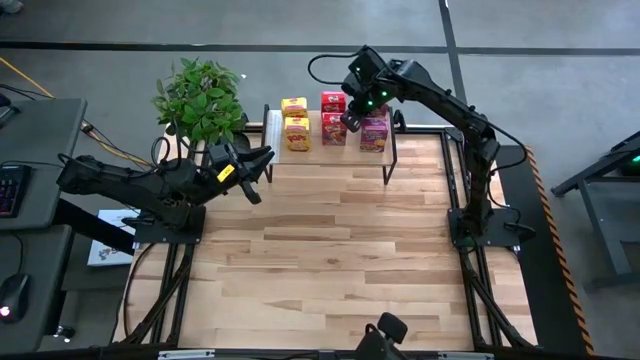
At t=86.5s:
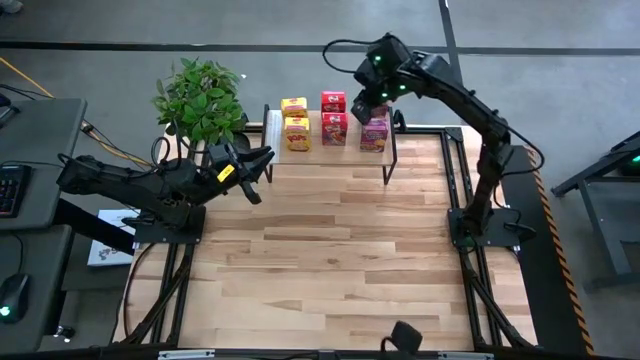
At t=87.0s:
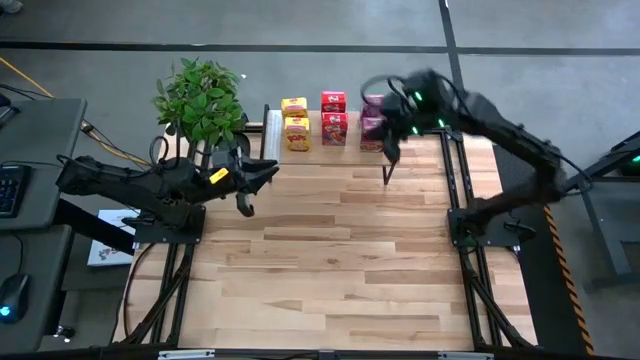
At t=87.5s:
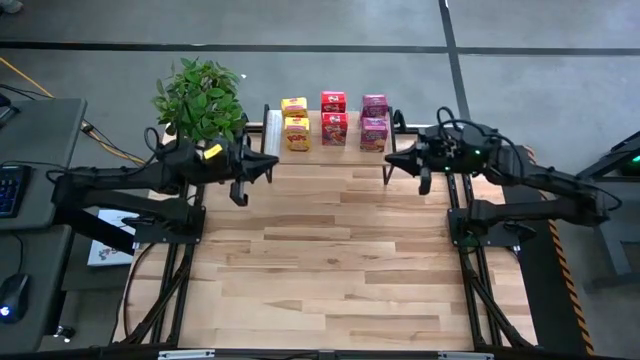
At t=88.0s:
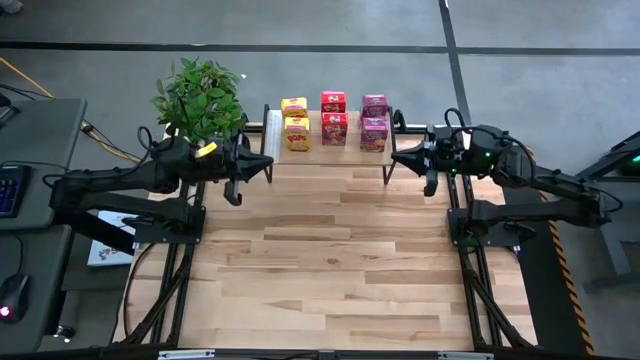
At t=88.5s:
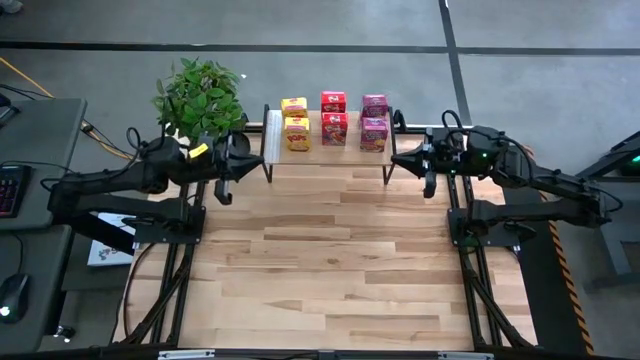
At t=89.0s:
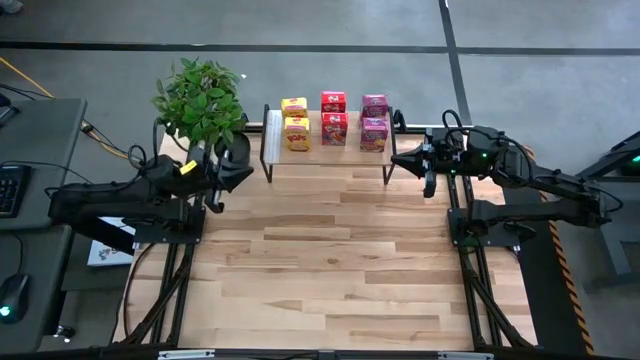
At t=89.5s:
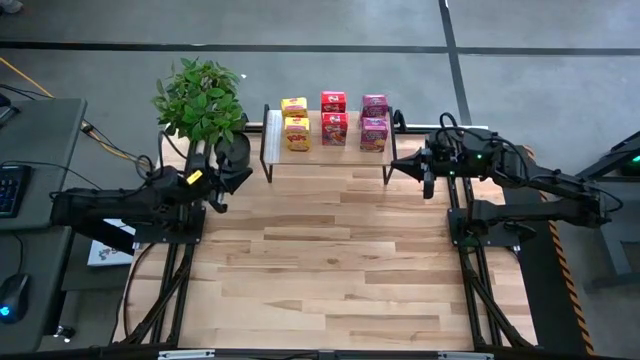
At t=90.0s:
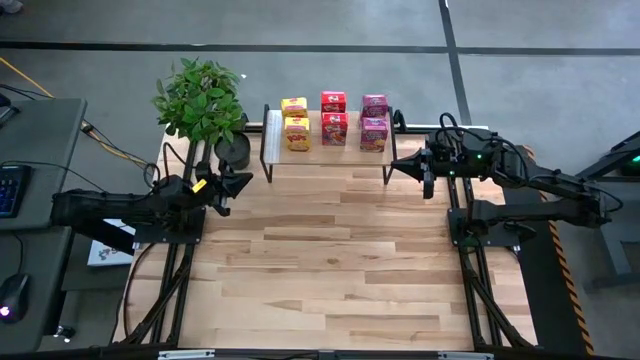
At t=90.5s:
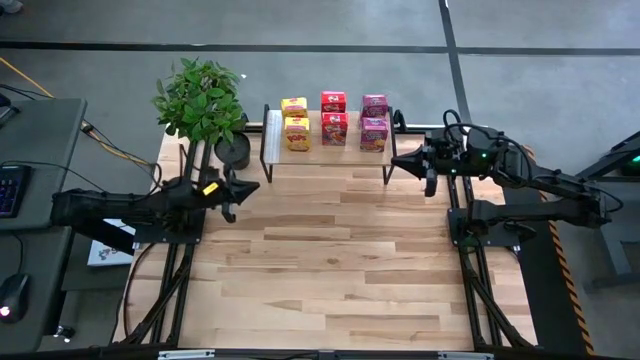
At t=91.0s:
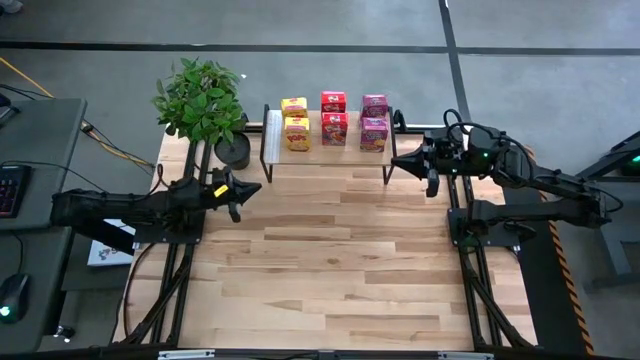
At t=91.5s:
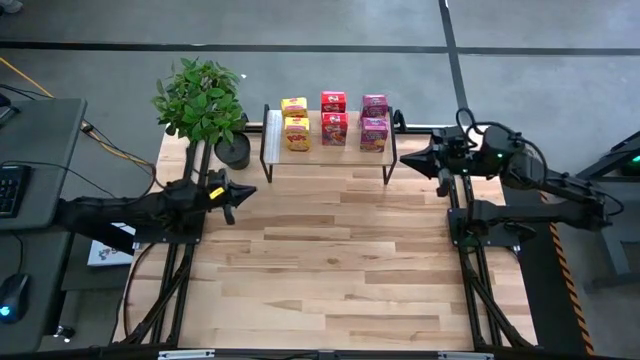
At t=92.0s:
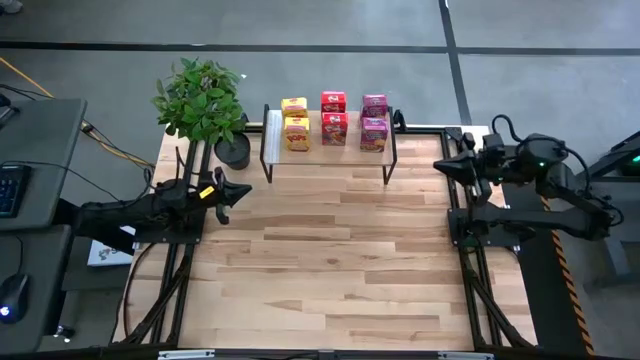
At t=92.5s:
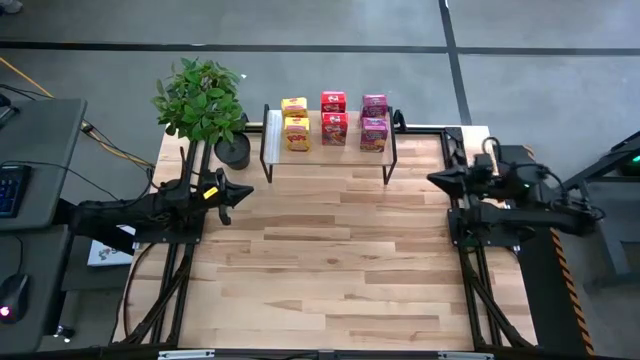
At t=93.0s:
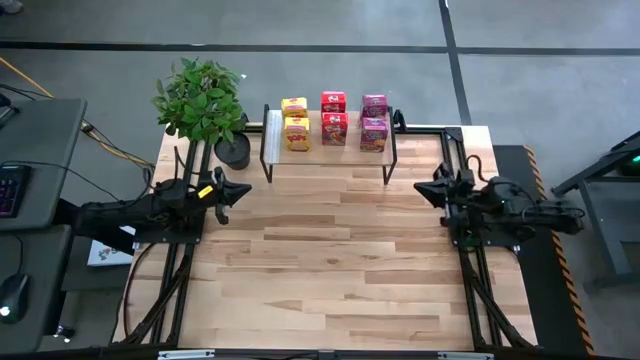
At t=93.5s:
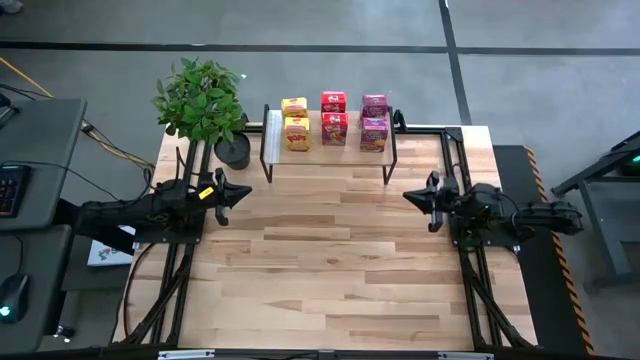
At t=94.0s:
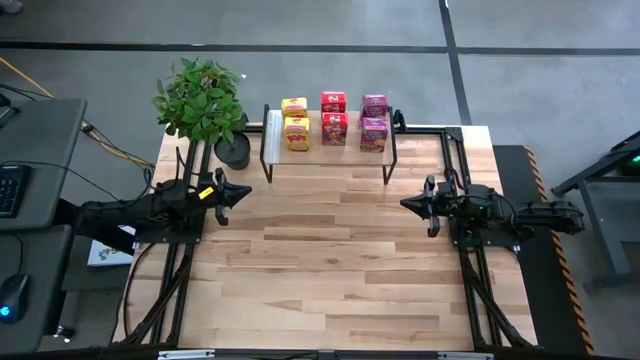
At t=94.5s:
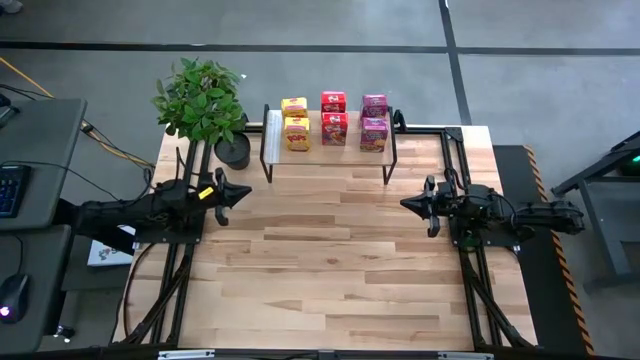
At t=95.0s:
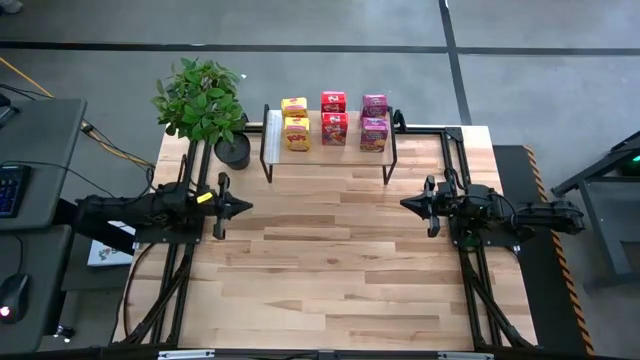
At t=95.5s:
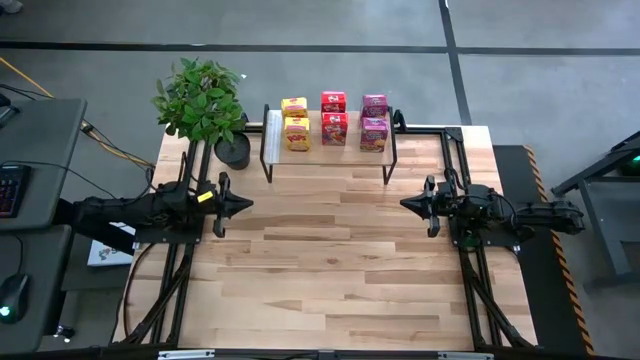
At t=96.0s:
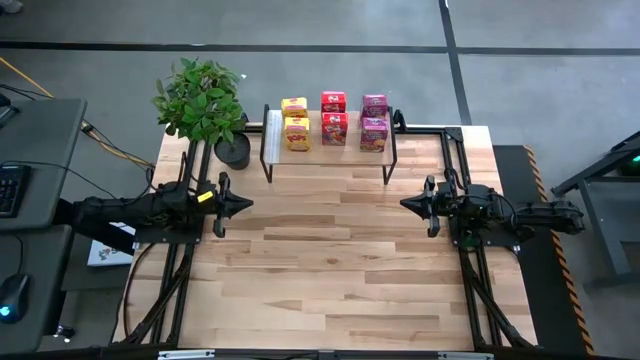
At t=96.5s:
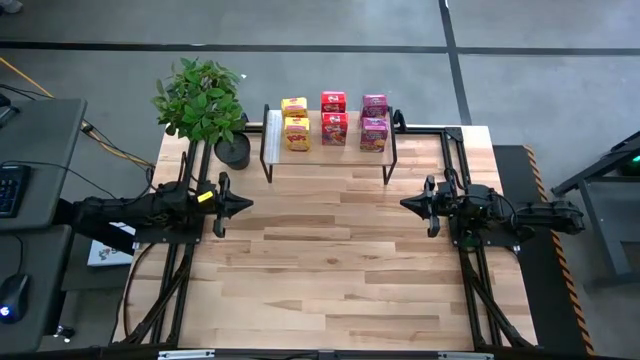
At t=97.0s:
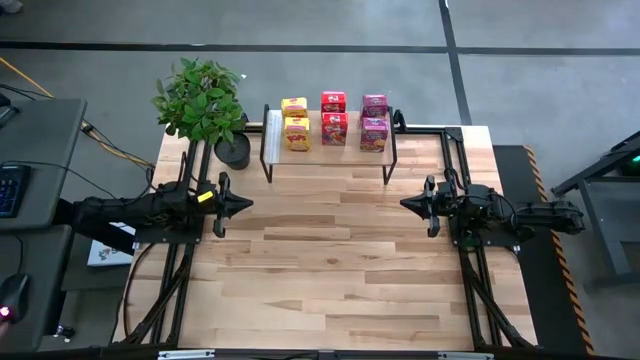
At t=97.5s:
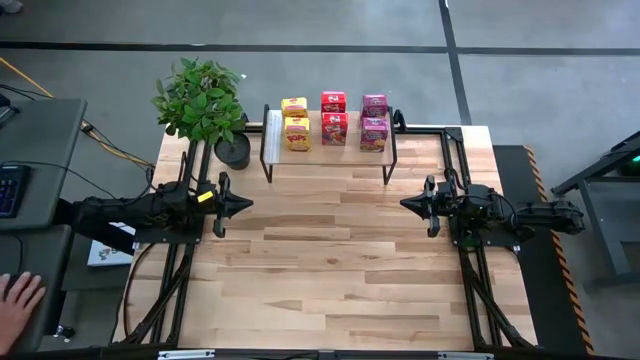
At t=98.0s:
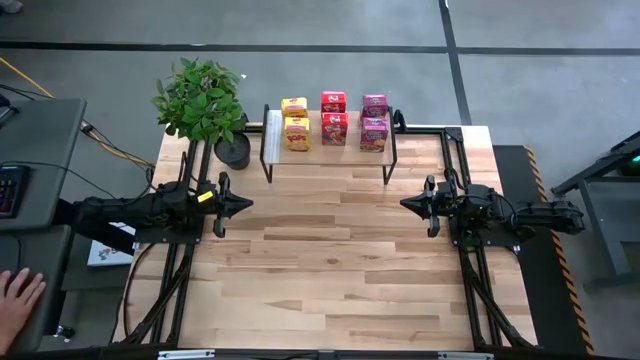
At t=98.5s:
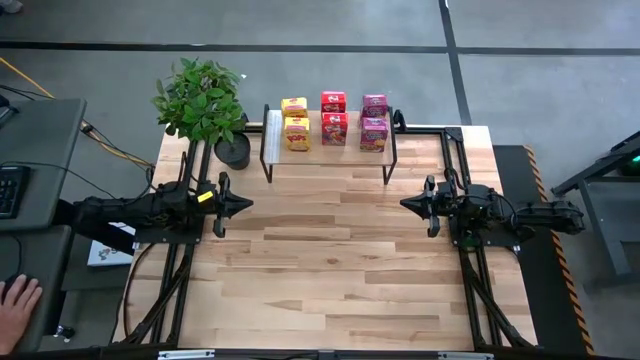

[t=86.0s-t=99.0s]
Task: Stack cereal on shelf
Return to Home Position

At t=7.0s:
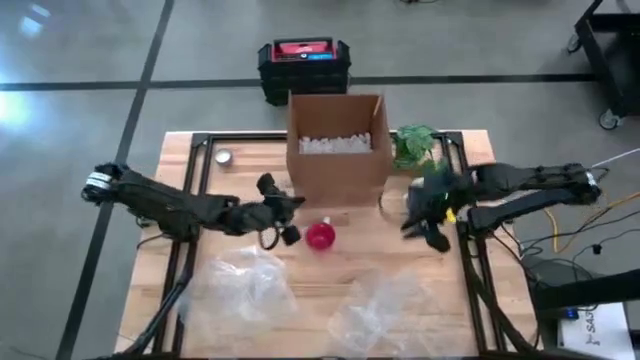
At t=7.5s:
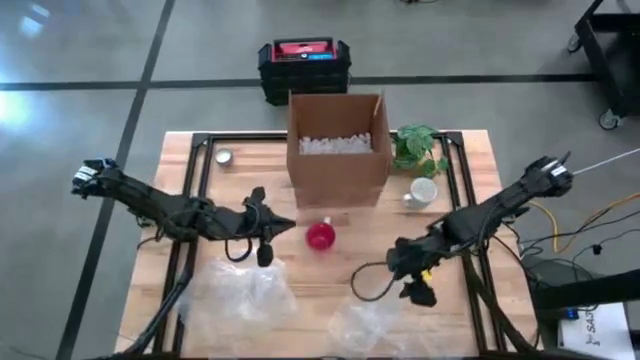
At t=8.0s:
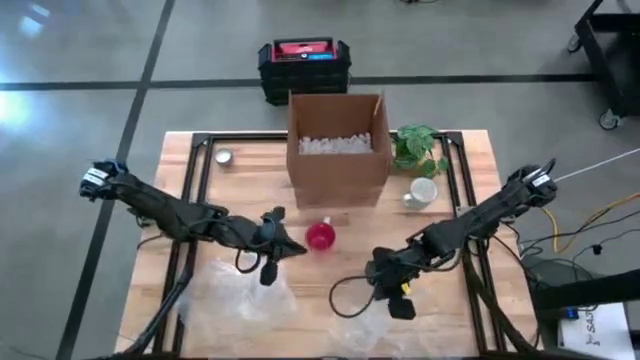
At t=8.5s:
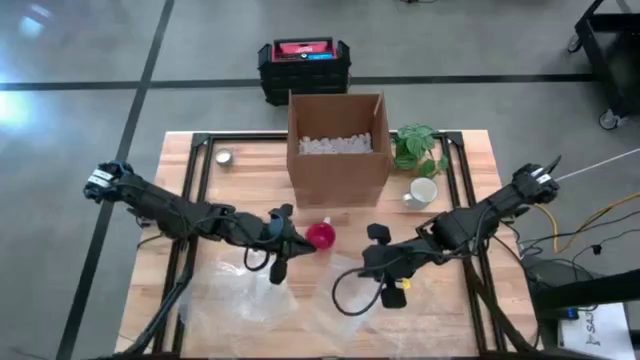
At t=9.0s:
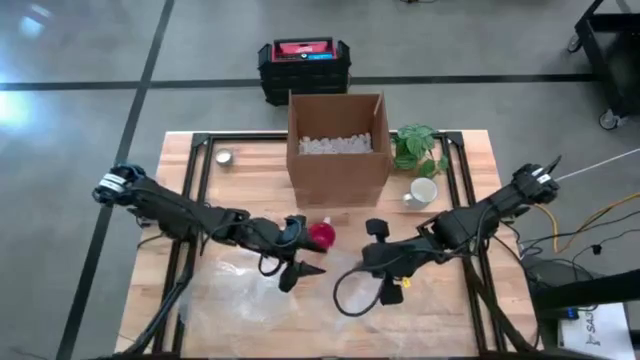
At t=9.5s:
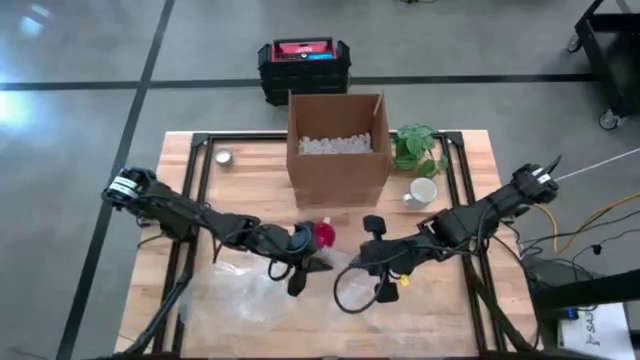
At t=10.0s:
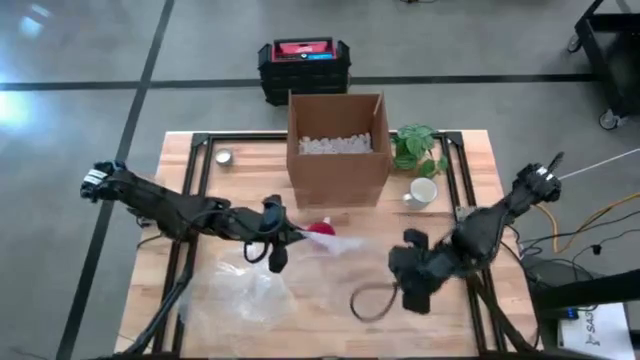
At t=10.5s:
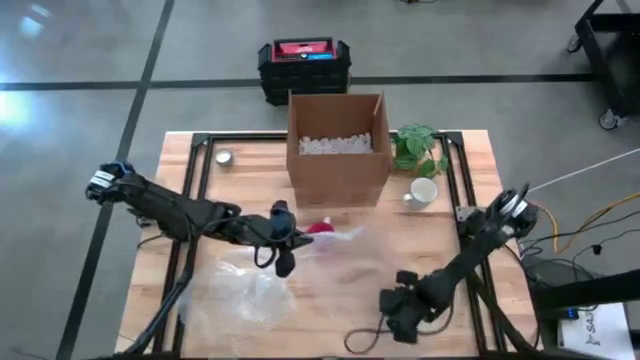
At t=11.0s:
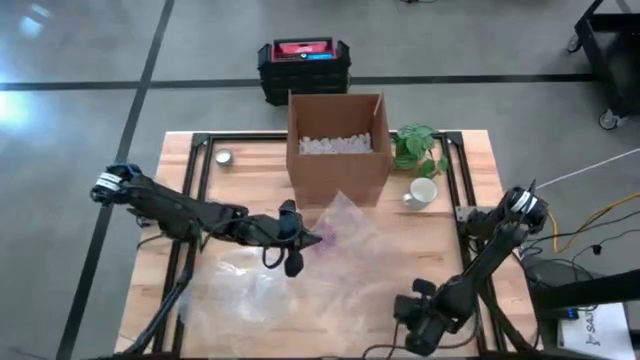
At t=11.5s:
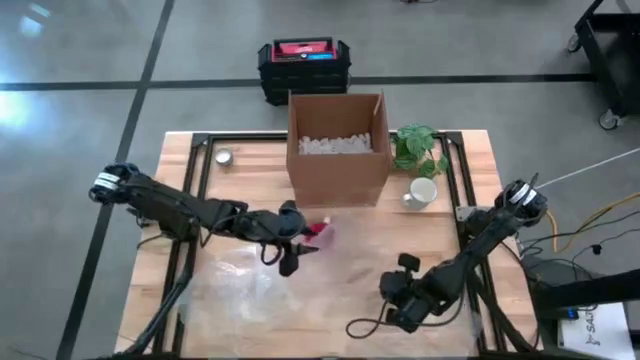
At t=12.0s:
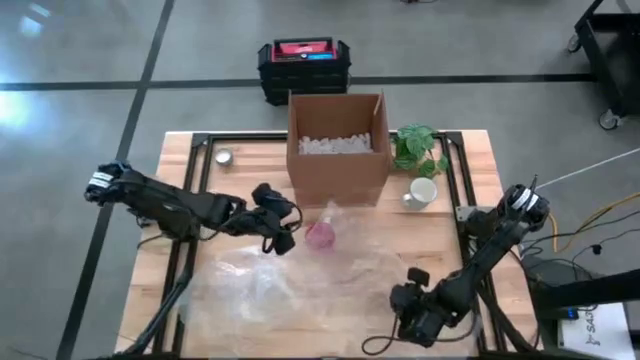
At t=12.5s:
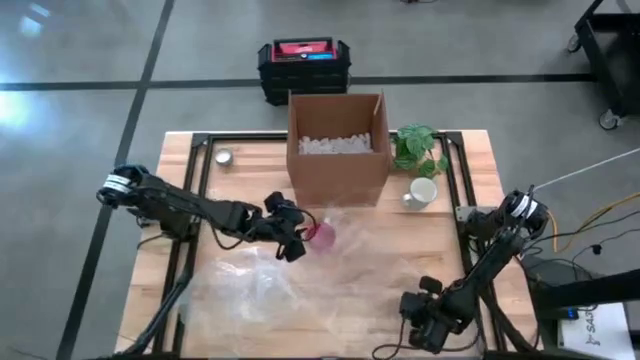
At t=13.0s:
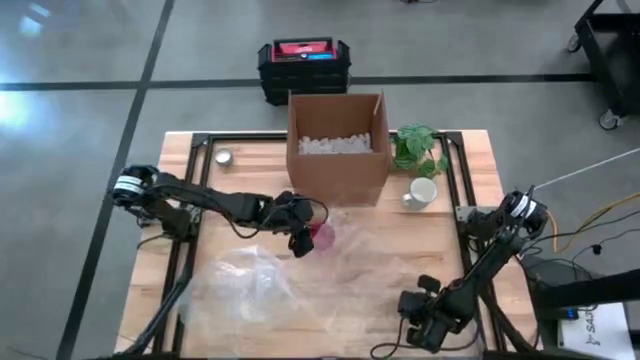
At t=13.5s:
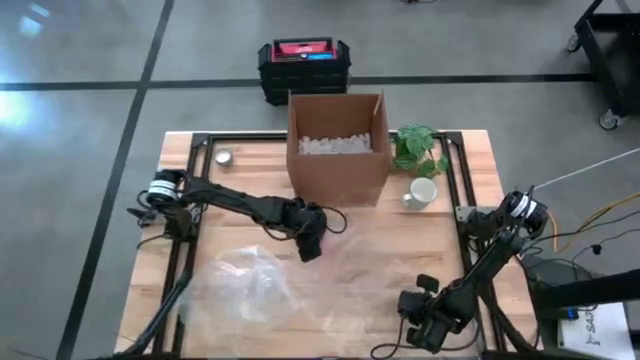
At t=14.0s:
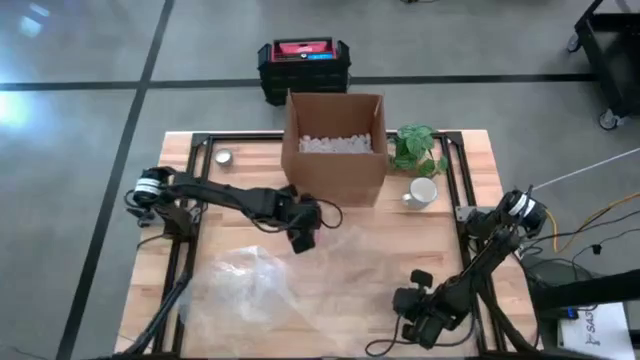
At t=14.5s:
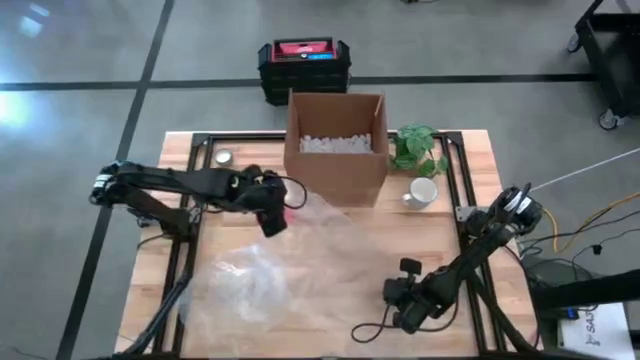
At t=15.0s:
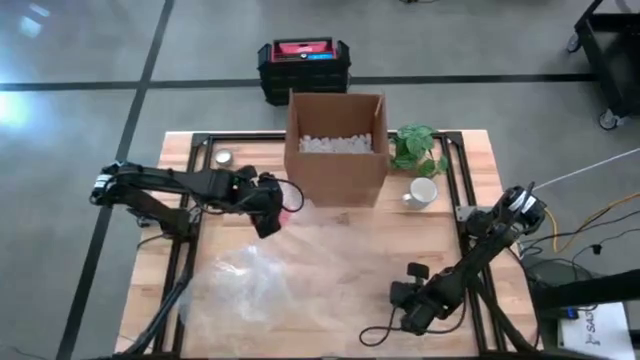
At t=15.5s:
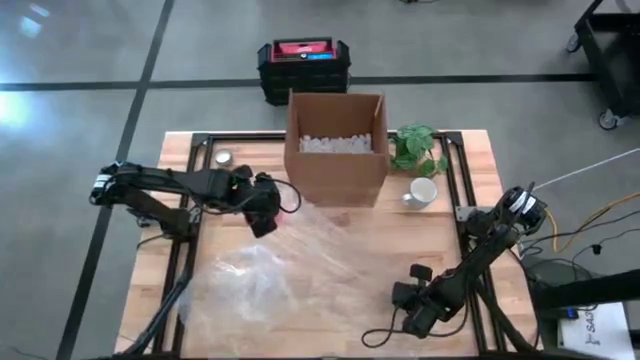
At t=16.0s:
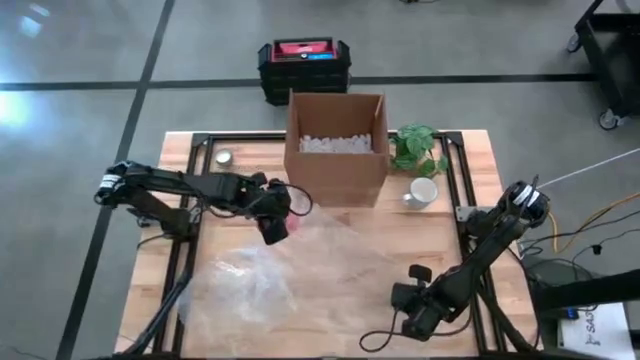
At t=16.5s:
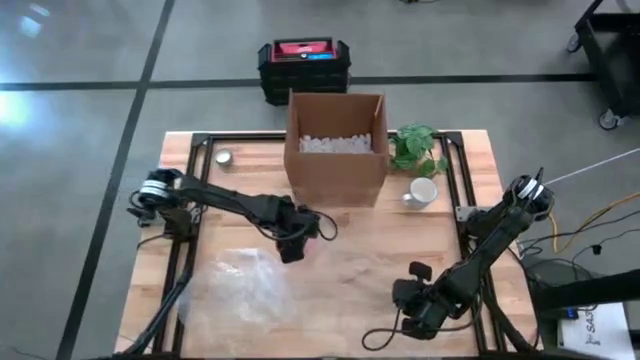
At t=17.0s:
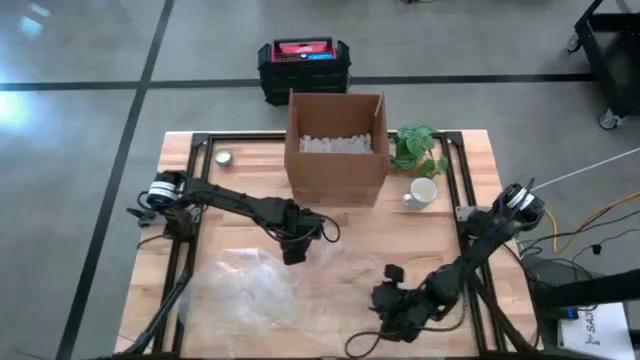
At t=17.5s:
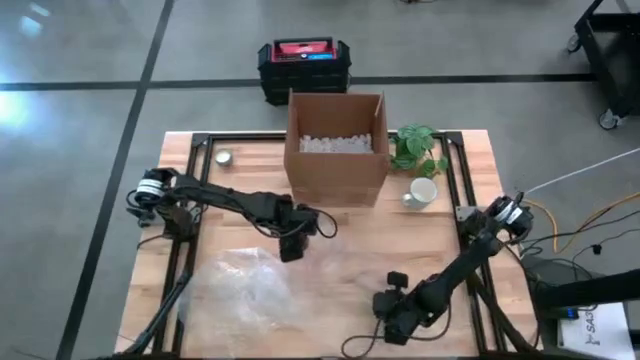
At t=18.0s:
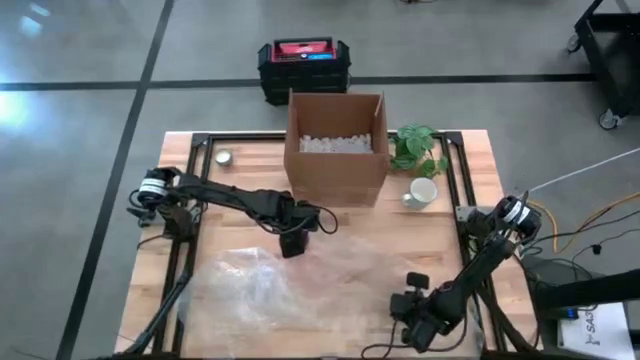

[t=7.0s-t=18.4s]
Task: wrap mug
Wrap the orange mug with the right transparent bubble wrap
